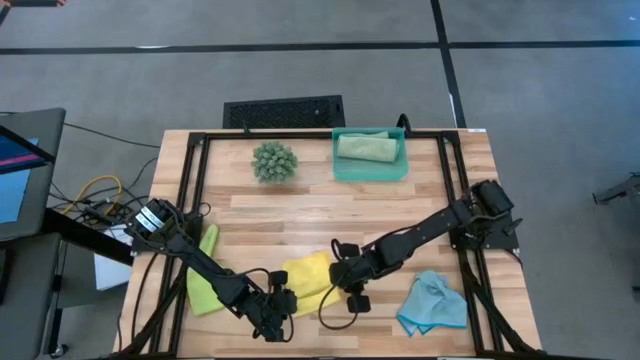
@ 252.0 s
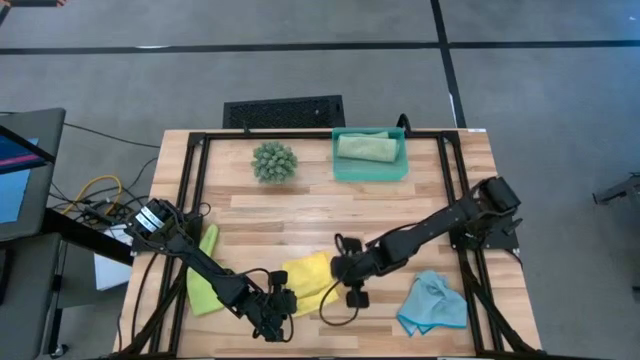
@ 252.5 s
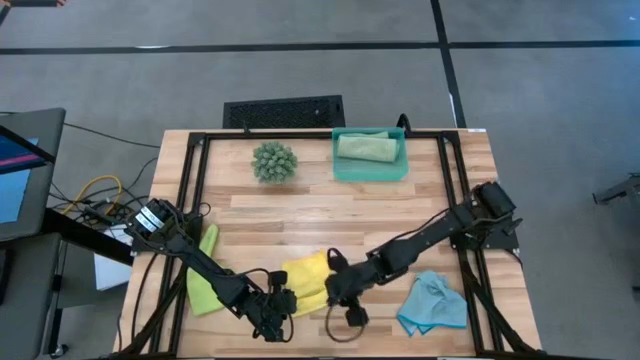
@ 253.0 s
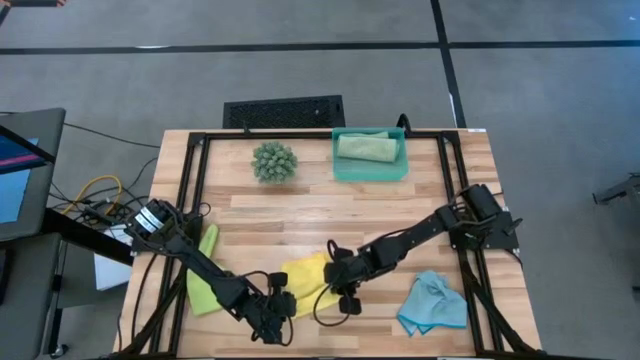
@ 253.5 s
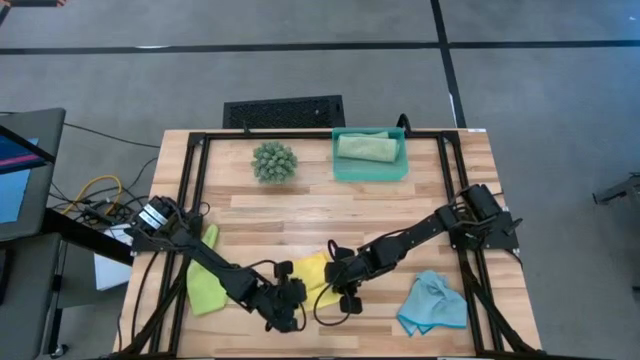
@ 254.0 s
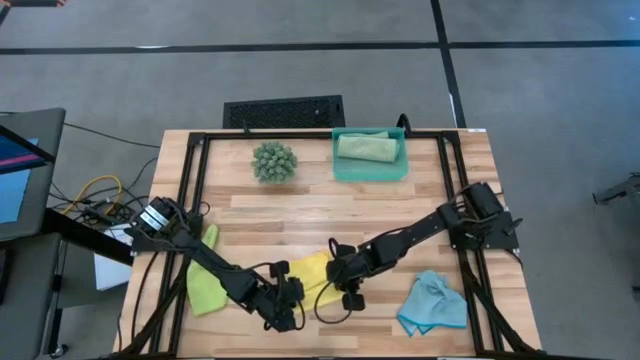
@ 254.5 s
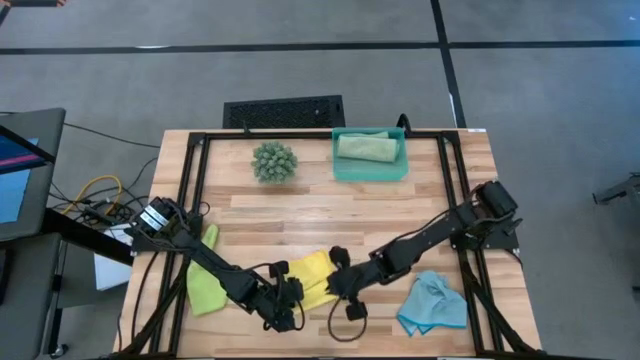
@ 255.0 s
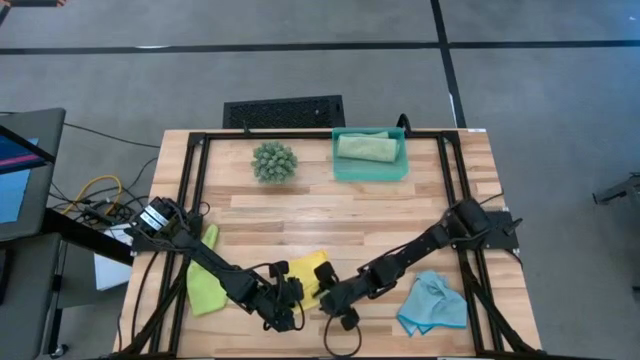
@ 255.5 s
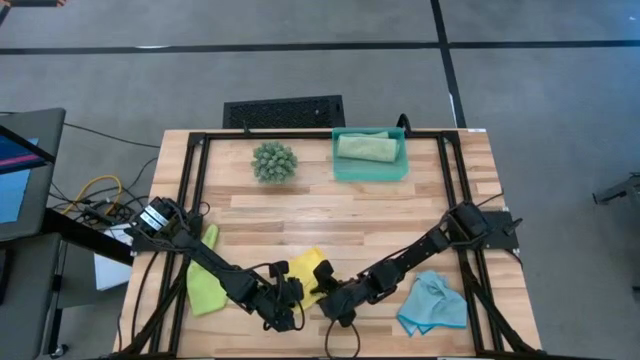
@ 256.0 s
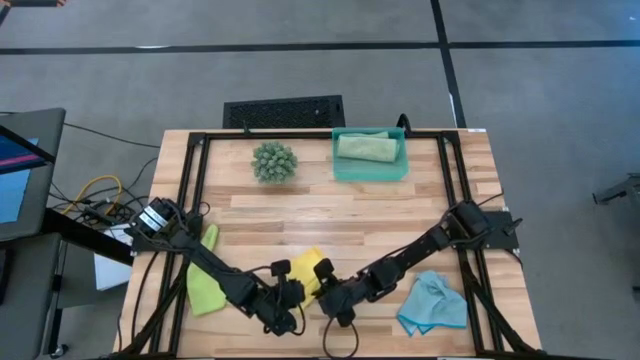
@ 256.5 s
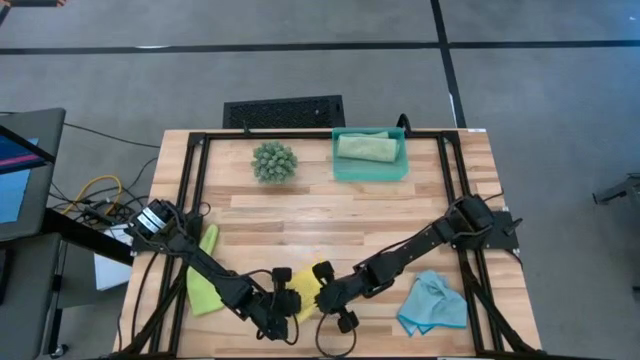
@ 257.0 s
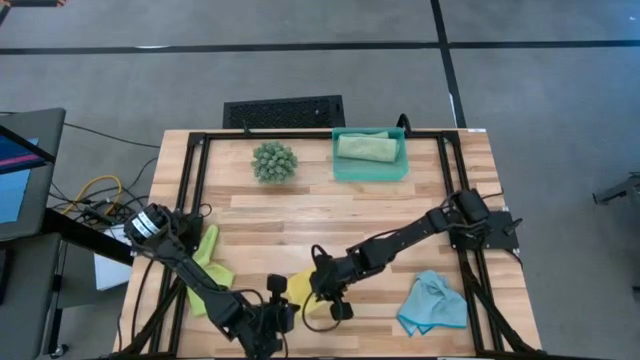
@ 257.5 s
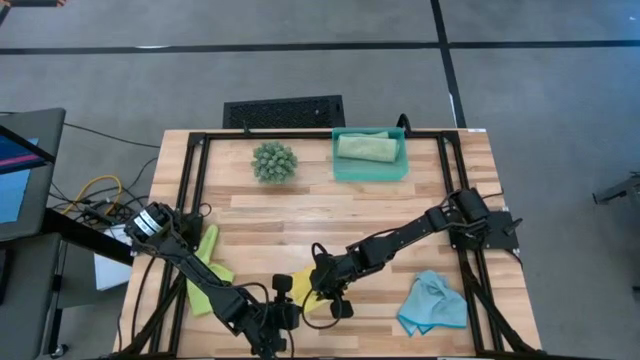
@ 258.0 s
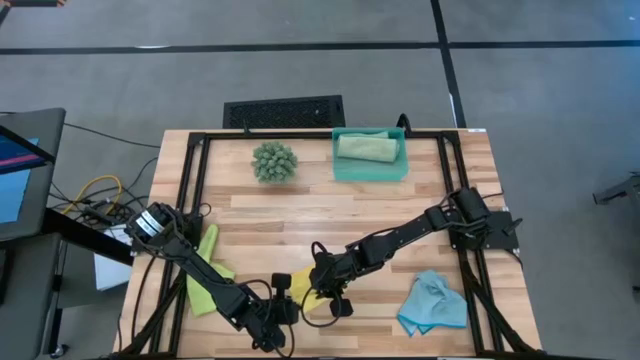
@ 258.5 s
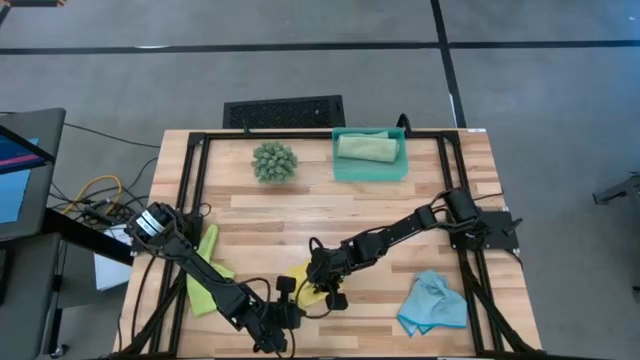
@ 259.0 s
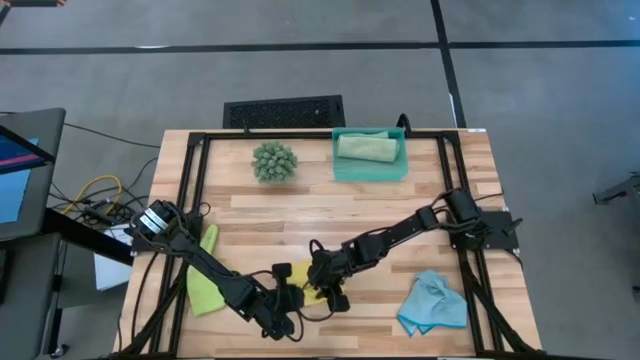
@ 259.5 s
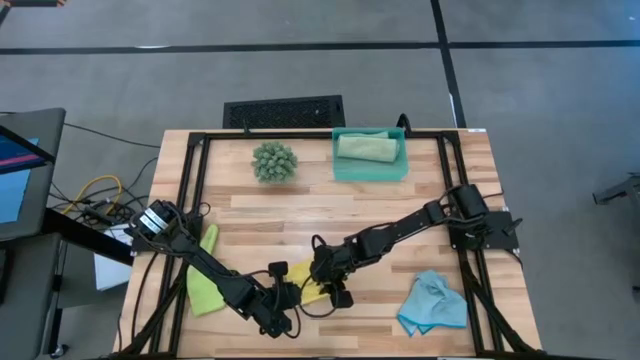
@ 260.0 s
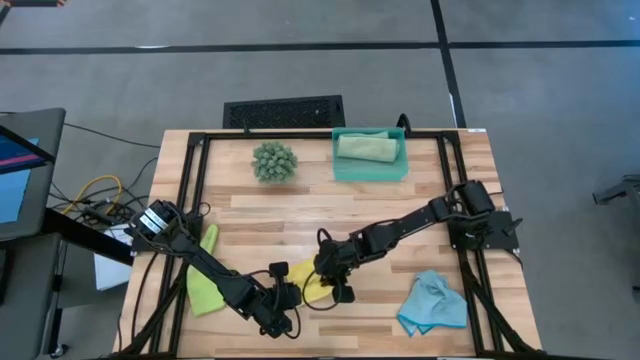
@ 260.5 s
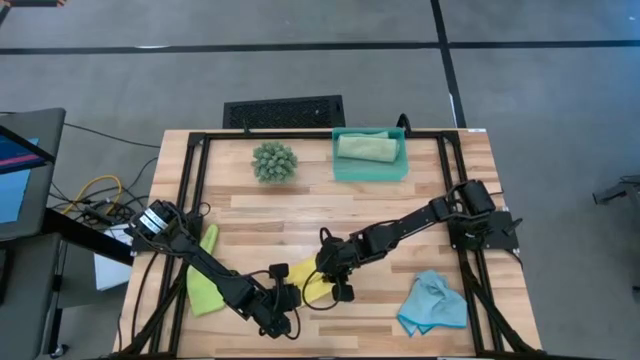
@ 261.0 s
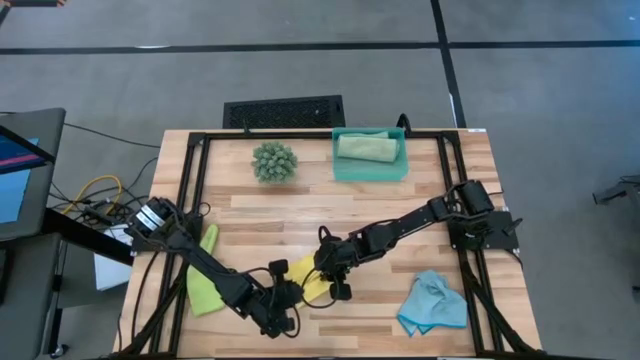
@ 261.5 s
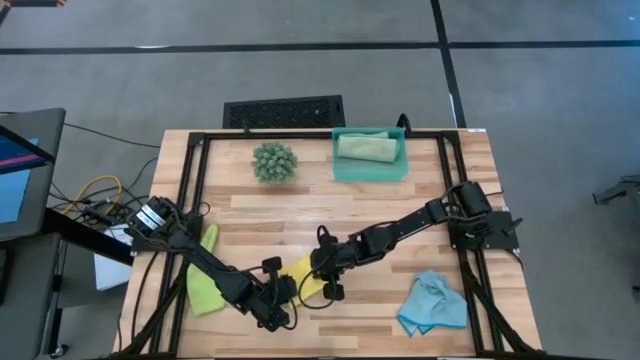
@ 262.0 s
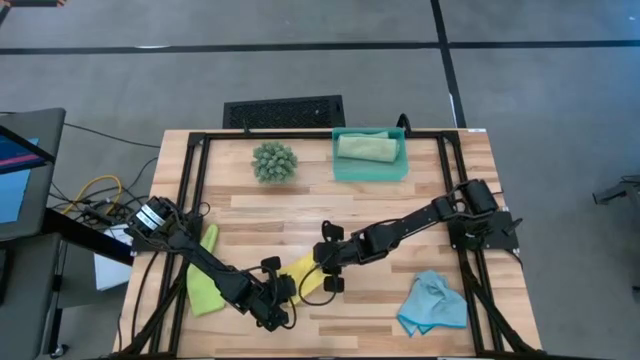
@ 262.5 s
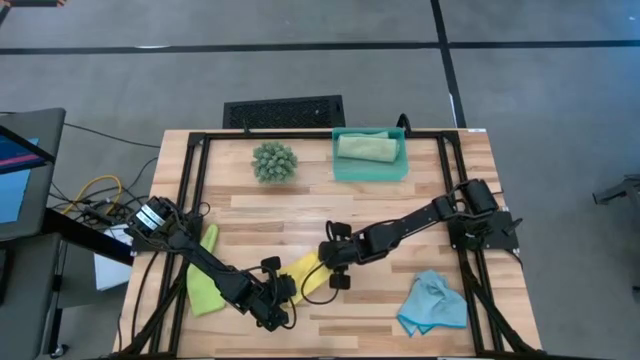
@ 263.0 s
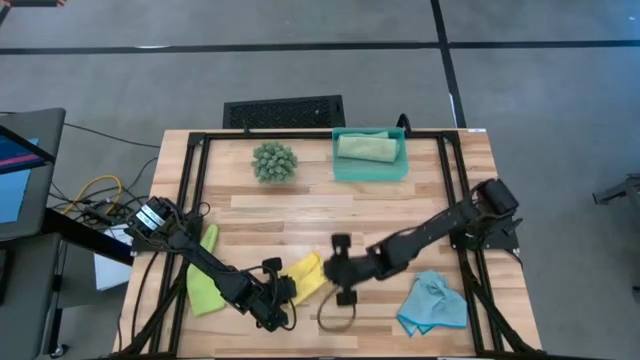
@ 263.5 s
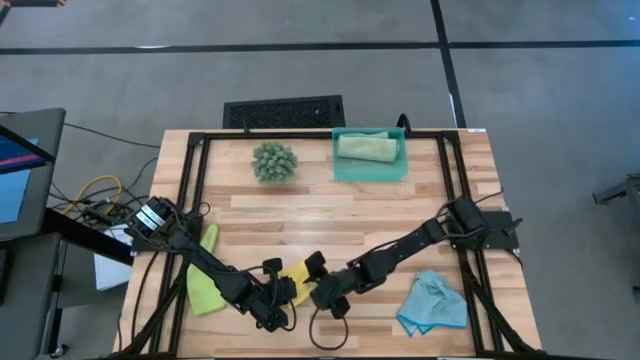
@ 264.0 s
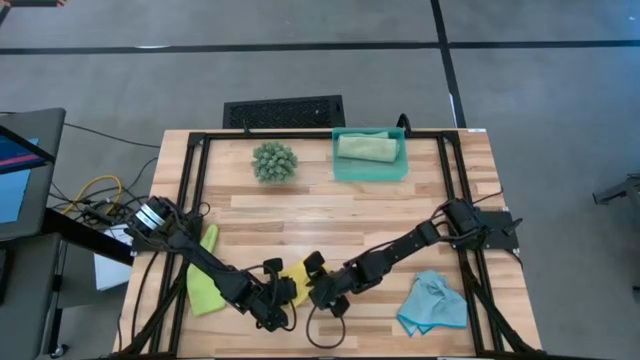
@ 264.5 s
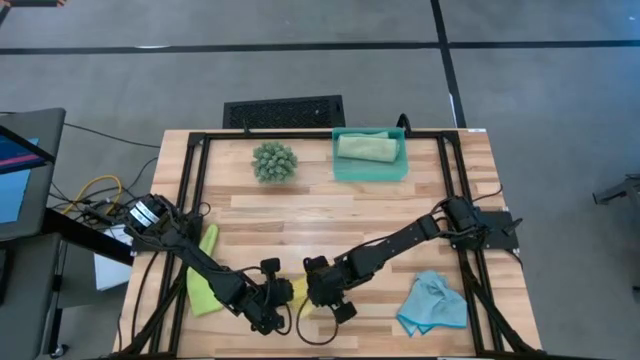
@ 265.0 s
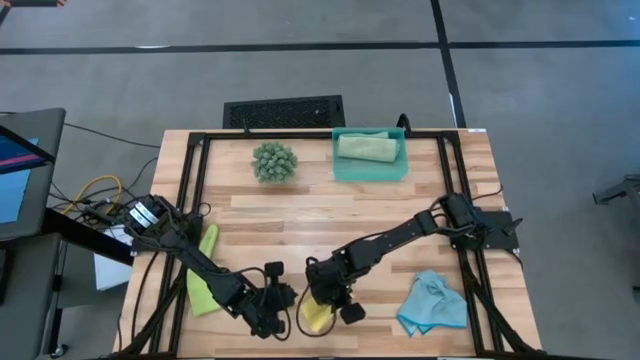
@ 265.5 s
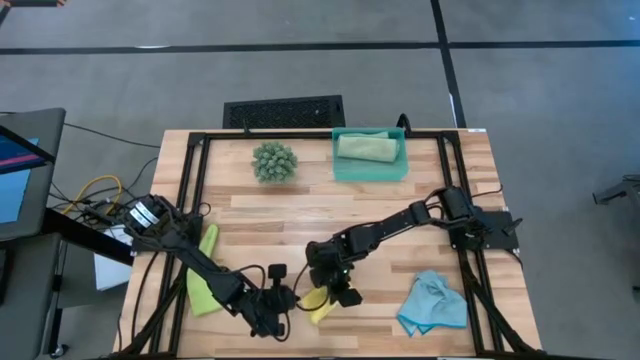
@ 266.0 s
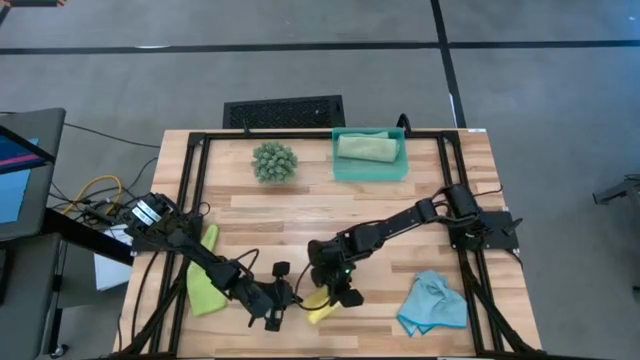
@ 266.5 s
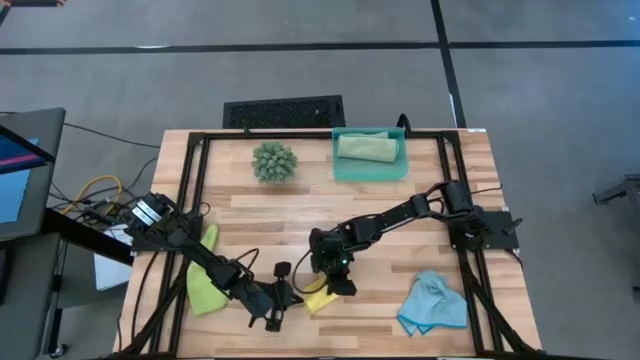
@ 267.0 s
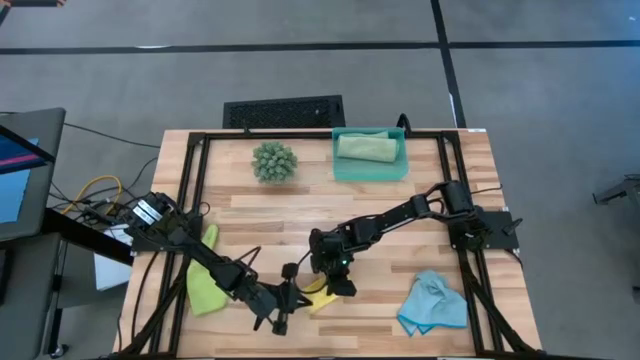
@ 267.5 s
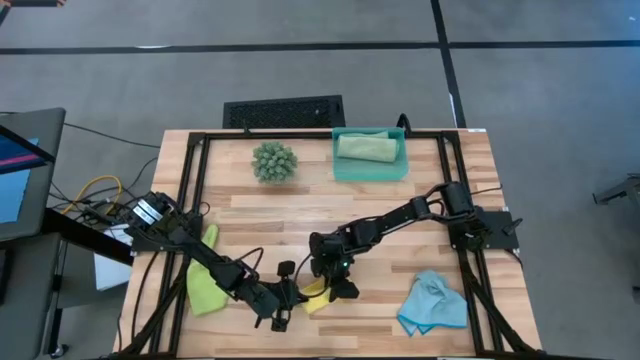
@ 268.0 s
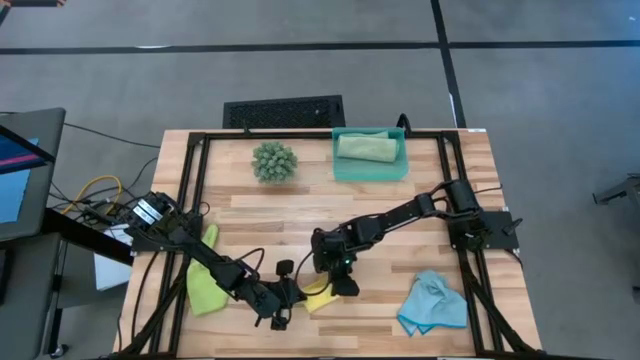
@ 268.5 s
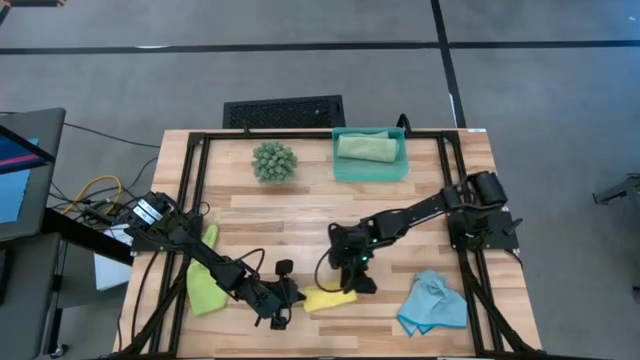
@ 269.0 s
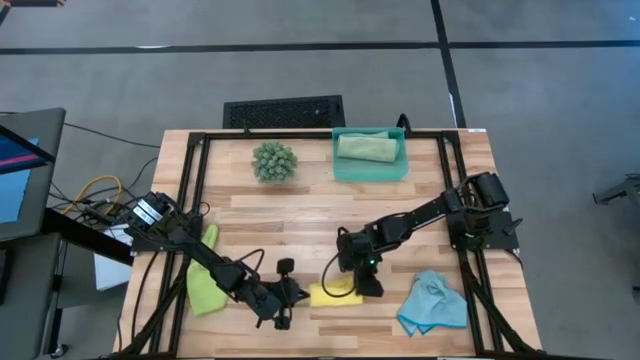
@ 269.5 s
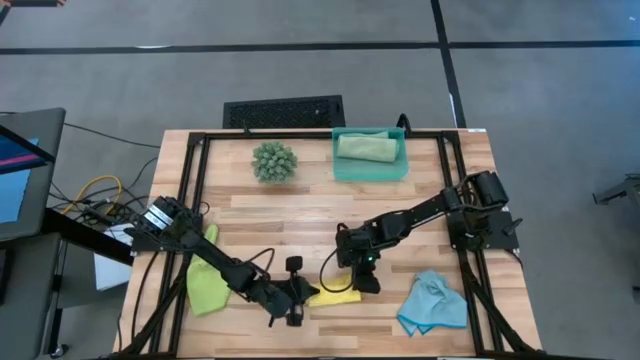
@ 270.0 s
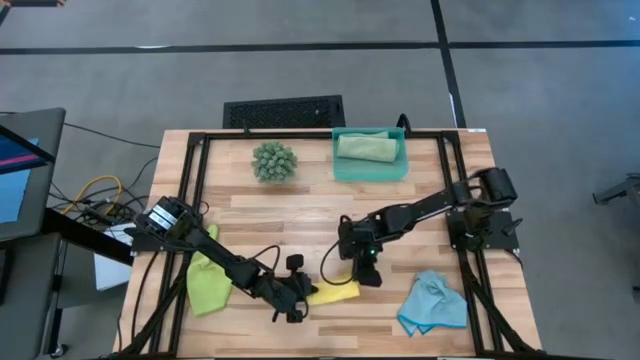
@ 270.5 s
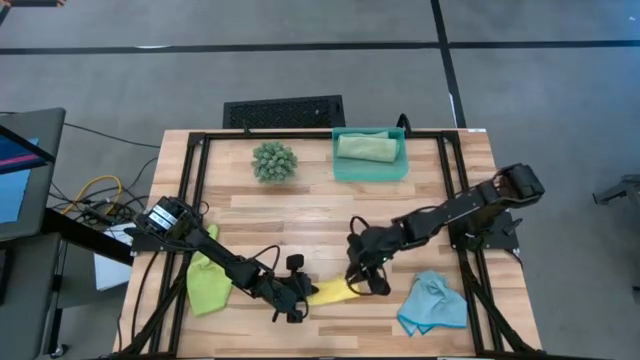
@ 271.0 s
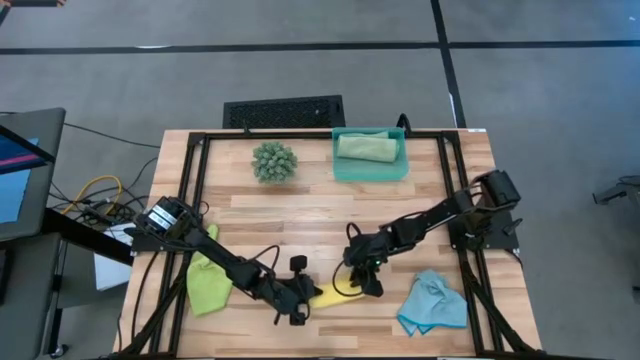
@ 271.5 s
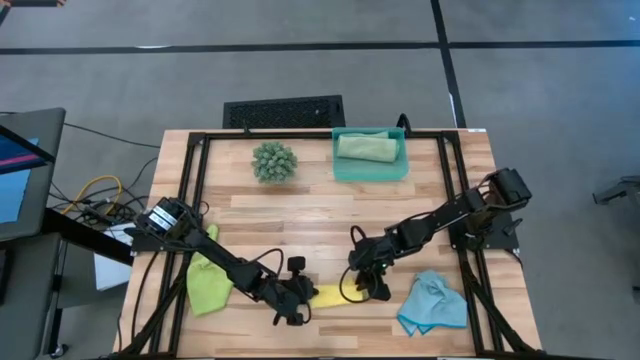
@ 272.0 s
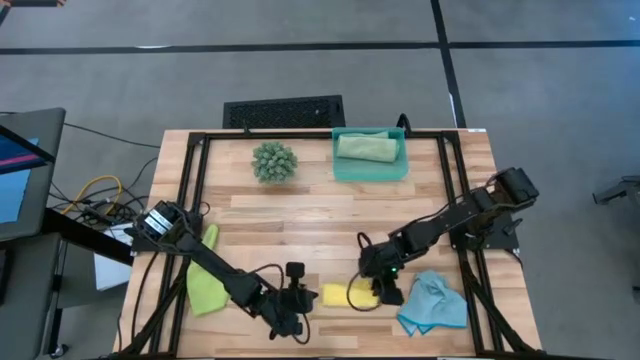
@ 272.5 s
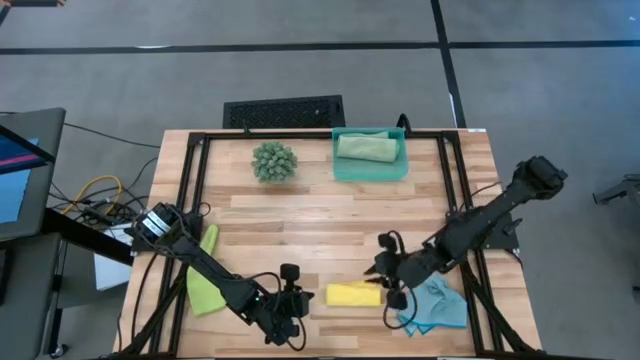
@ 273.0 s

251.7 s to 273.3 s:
Task: Roll microfiber towels into tight, uniform cylinder then place into a basket
Roll the yellow microfiber cloth
